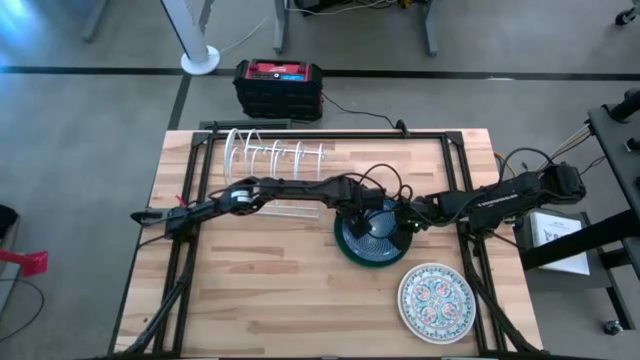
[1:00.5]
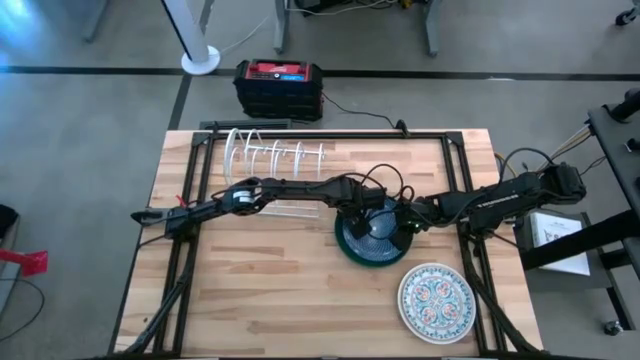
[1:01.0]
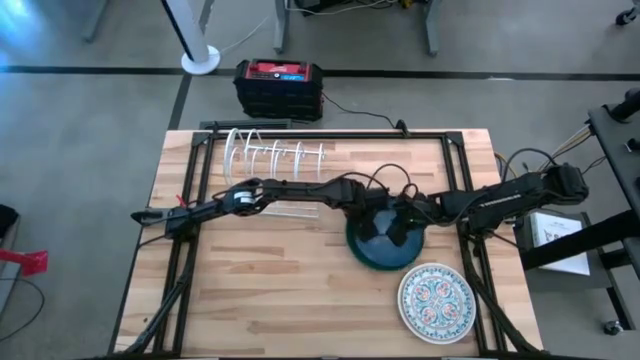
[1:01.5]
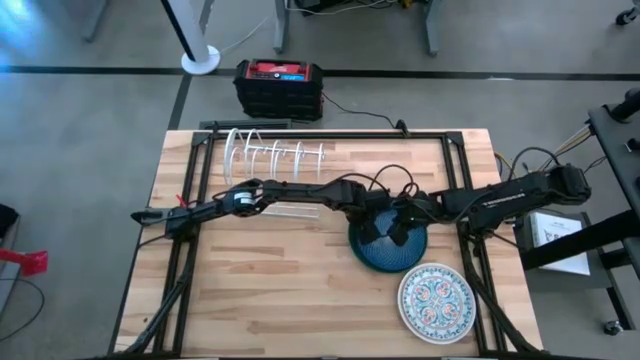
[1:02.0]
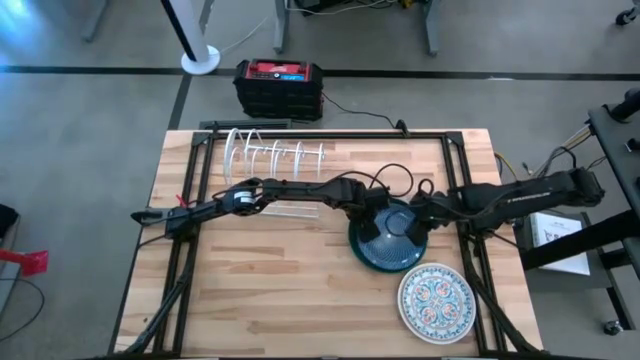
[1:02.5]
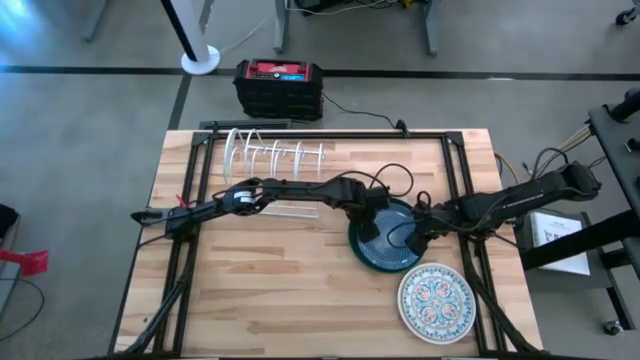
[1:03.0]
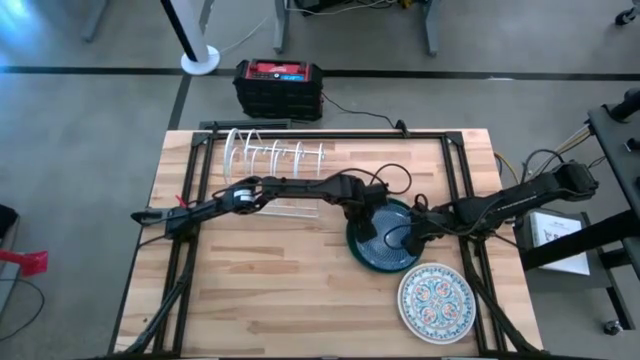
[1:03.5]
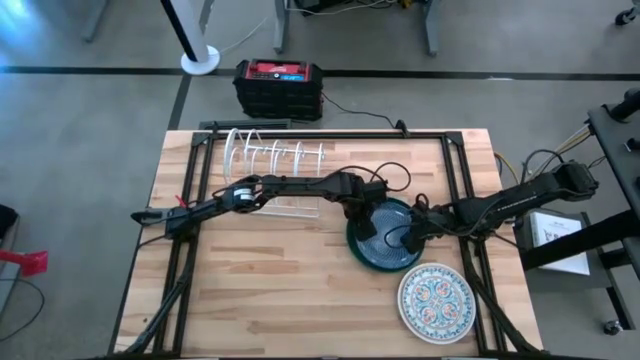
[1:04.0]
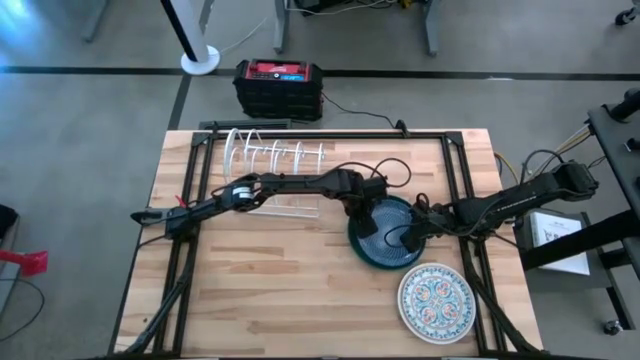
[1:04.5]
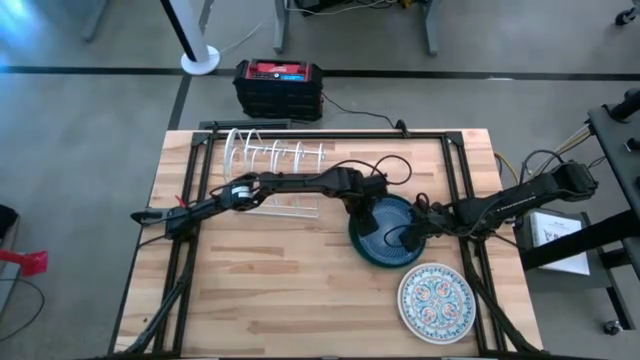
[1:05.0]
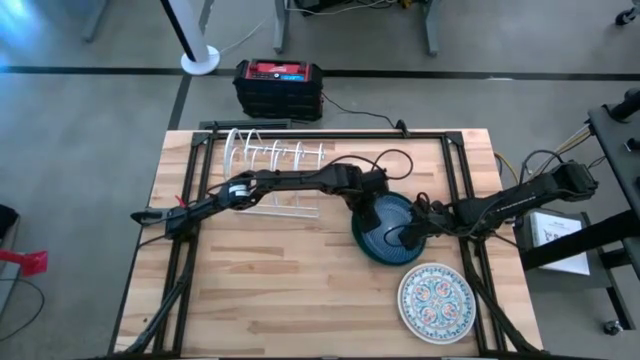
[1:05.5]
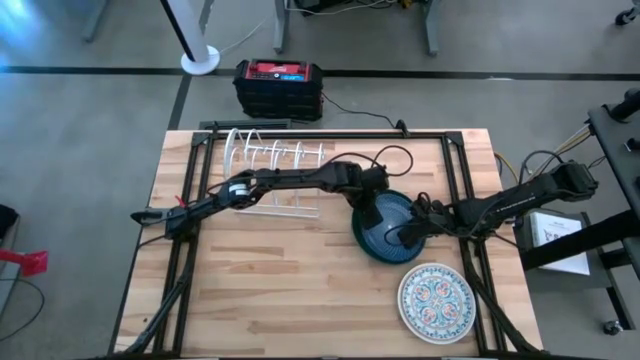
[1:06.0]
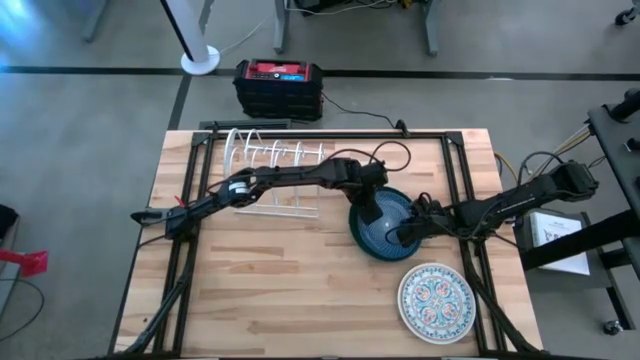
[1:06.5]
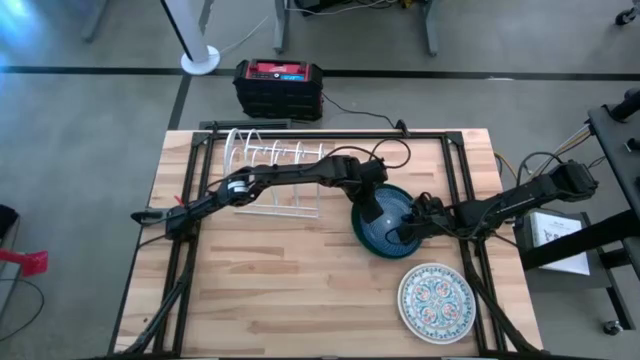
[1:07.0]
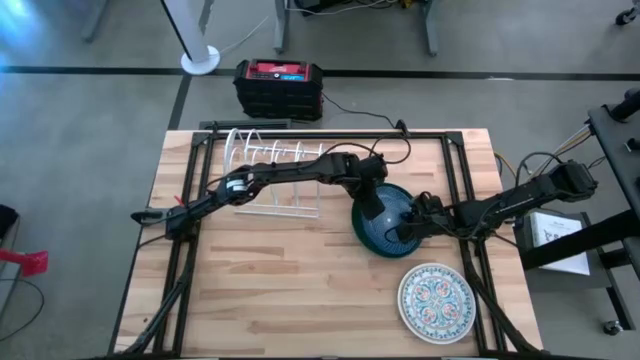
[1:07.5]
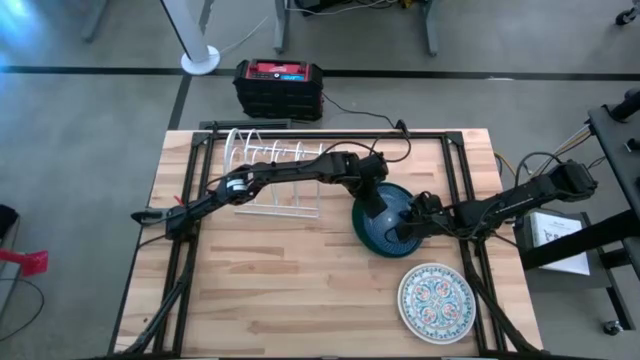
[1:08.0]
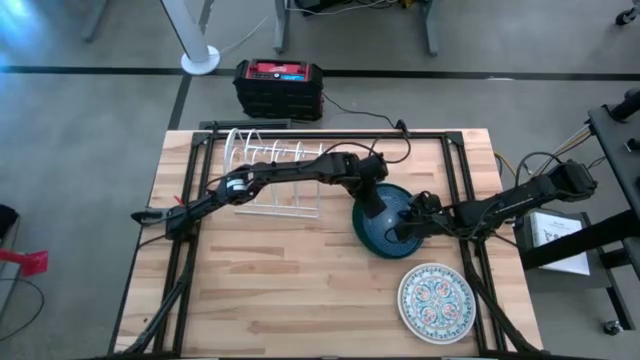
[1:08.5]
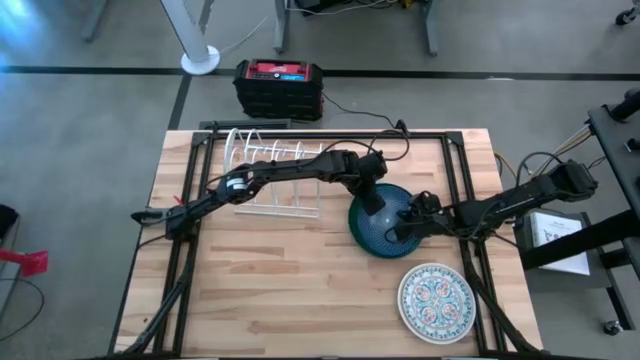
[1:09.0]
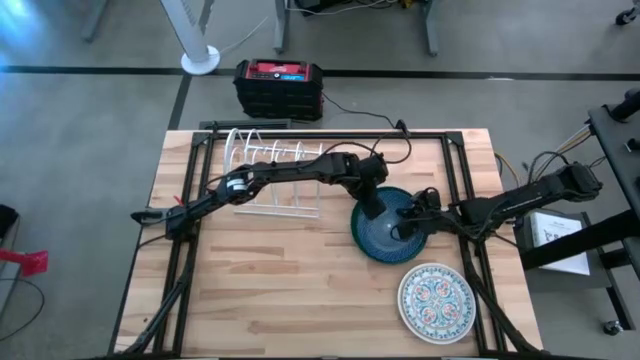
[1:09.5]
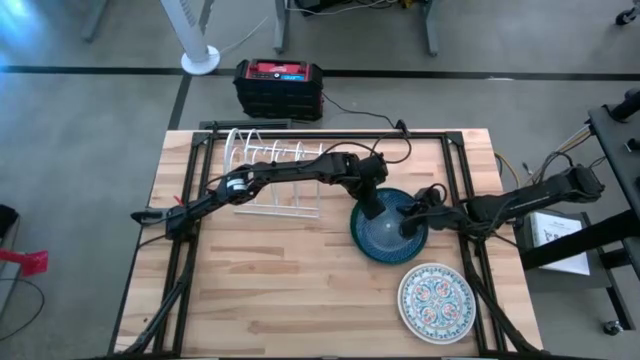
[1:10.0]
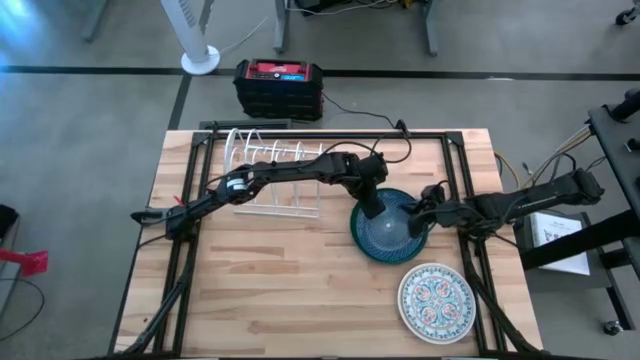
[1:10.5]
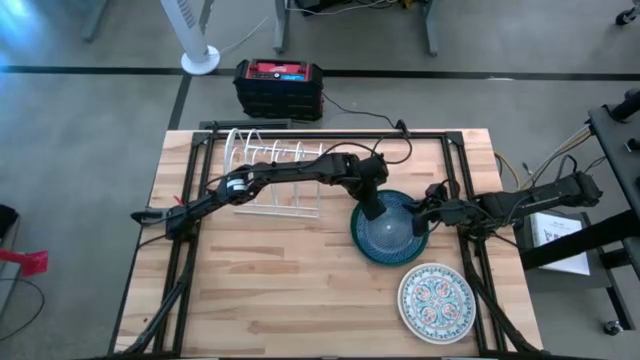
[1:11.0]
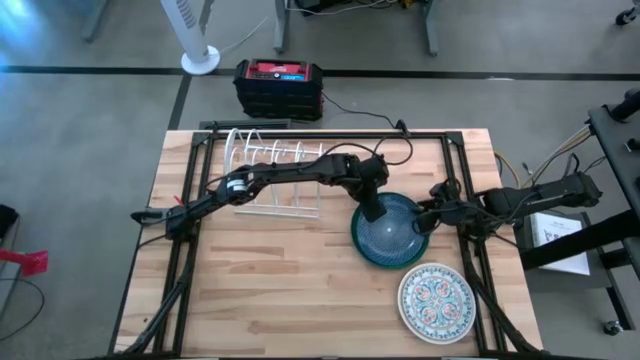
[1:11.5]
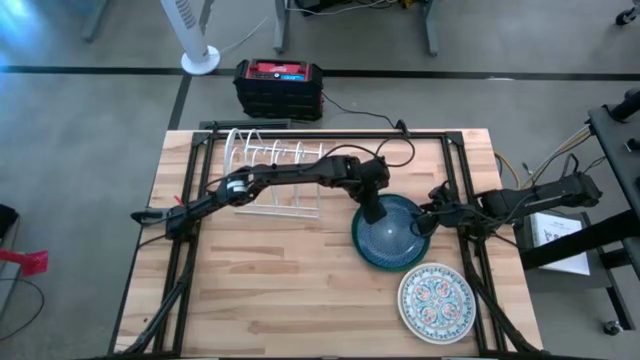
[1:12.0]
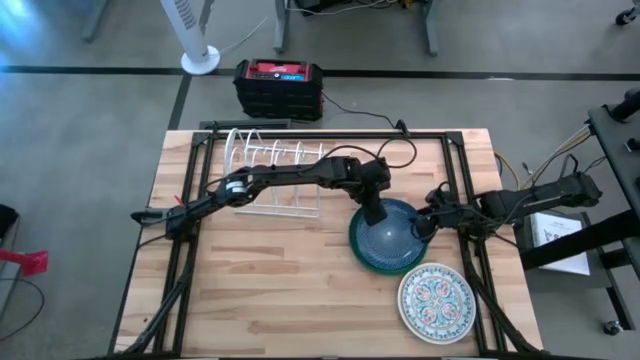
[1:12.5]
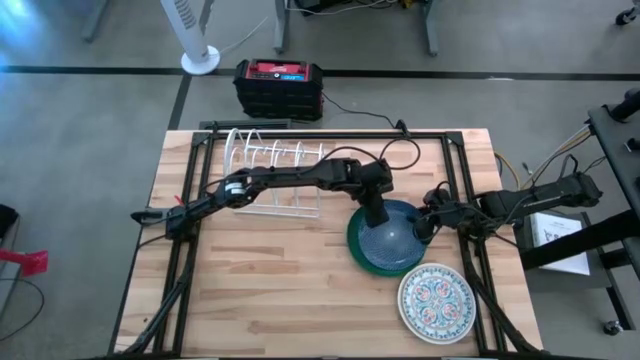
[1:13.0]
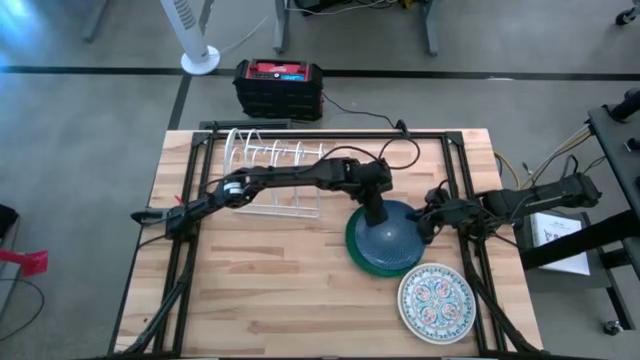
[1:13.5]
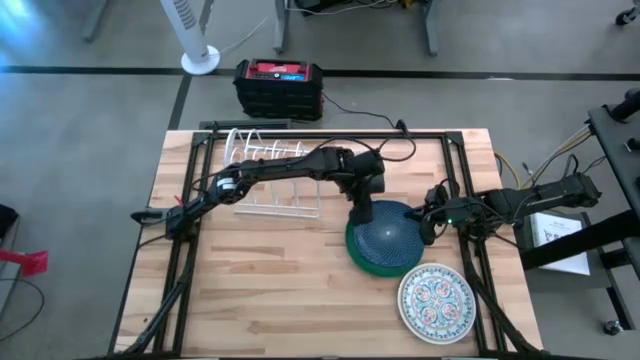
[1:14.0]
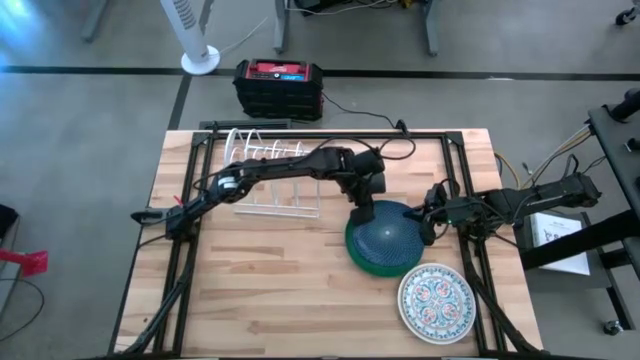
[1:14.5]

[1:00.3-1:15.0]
Task: Sort dishes
Put the blue patterned plate in the dish rack

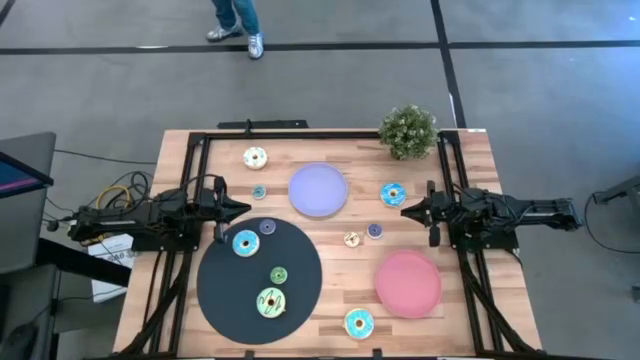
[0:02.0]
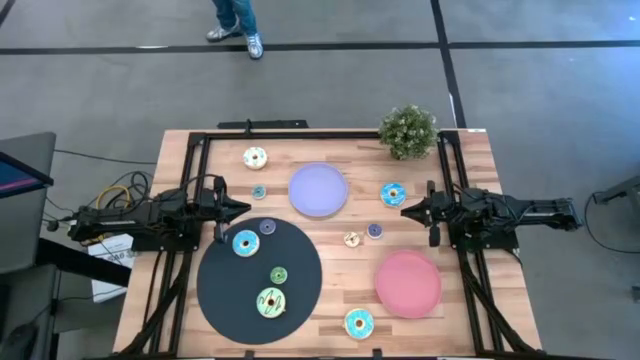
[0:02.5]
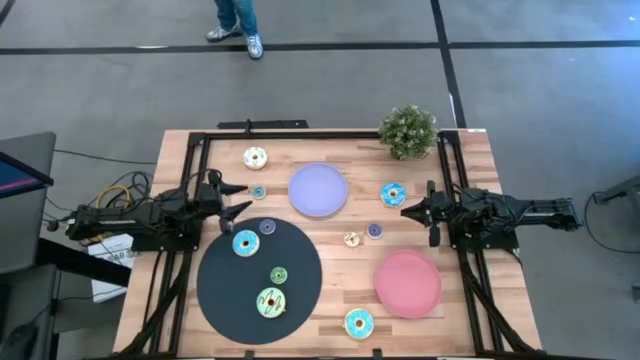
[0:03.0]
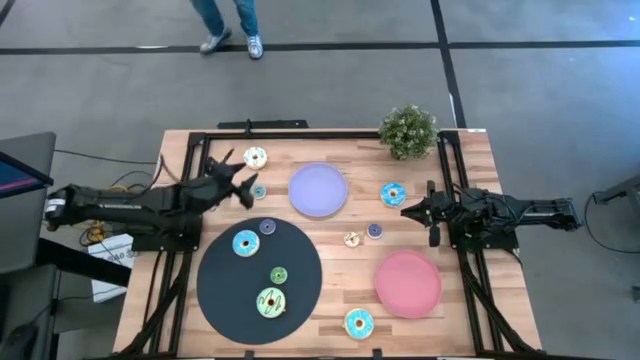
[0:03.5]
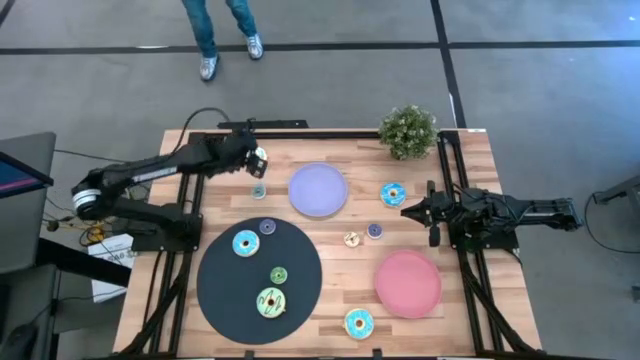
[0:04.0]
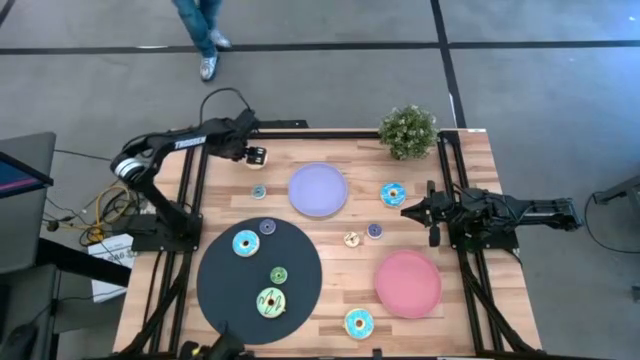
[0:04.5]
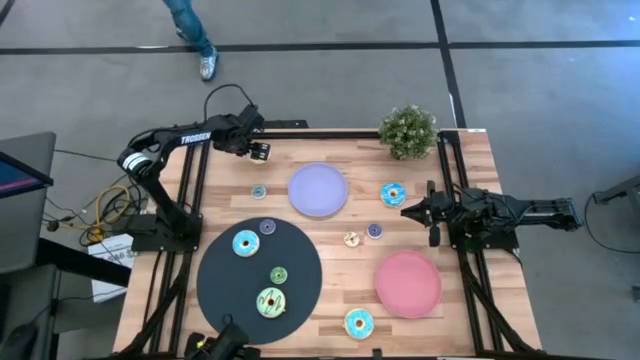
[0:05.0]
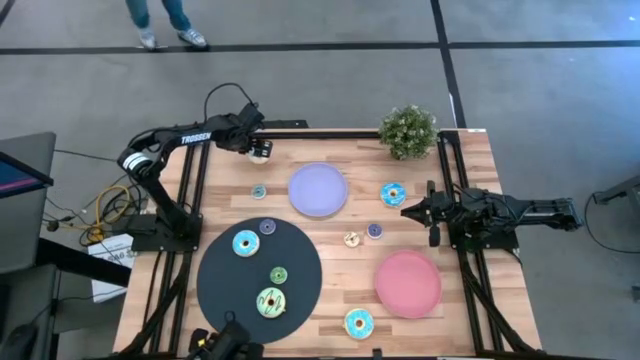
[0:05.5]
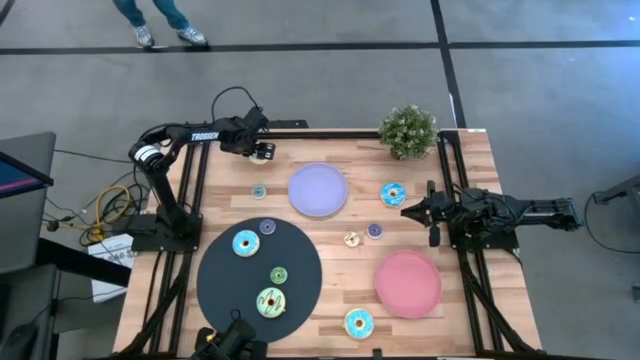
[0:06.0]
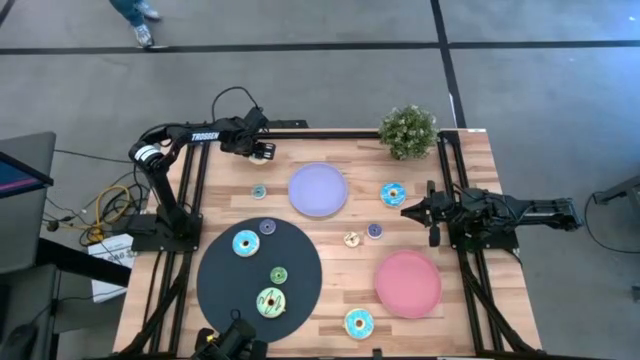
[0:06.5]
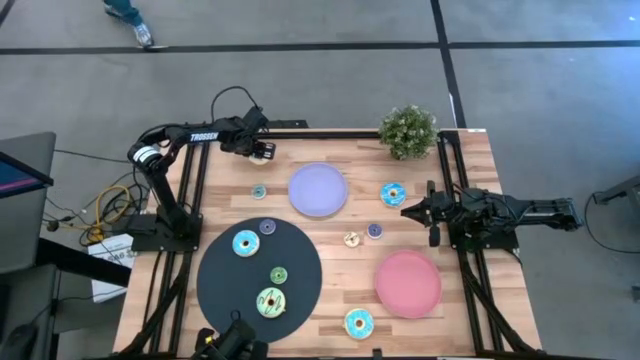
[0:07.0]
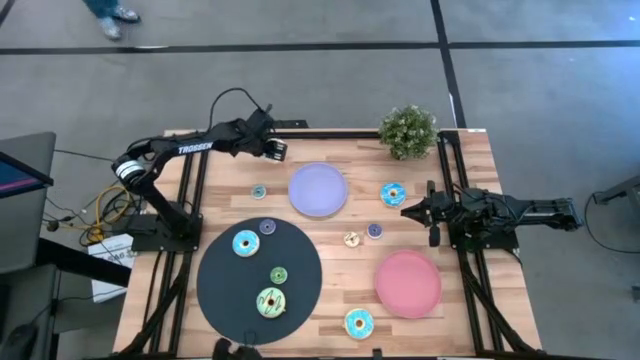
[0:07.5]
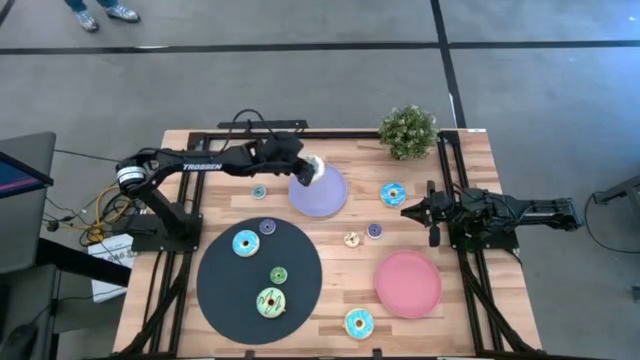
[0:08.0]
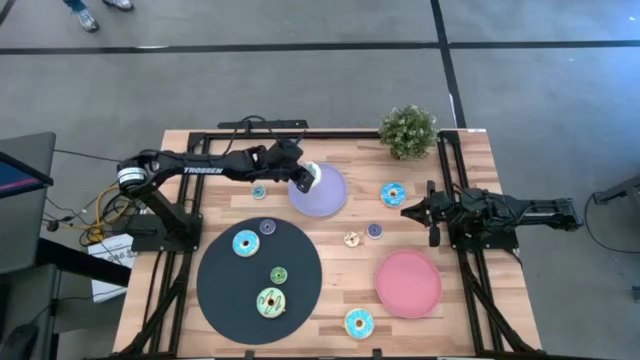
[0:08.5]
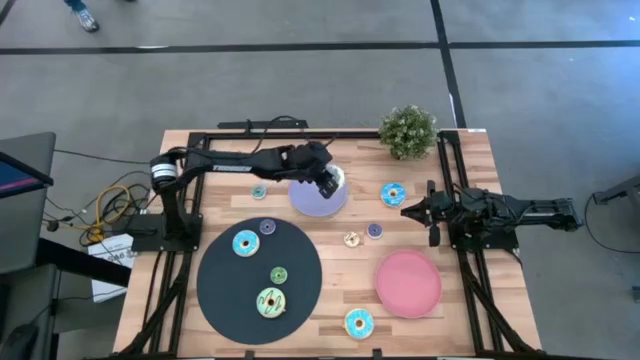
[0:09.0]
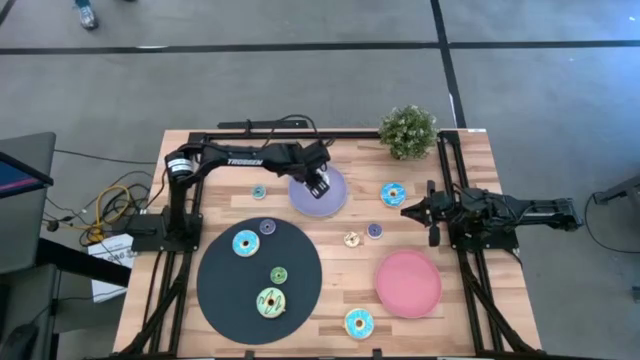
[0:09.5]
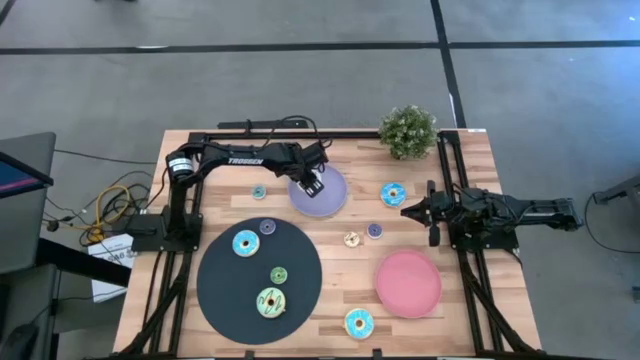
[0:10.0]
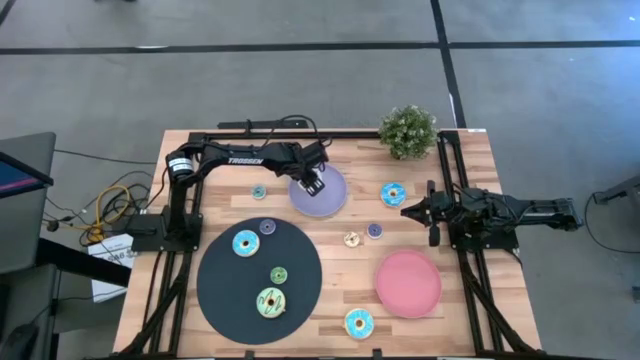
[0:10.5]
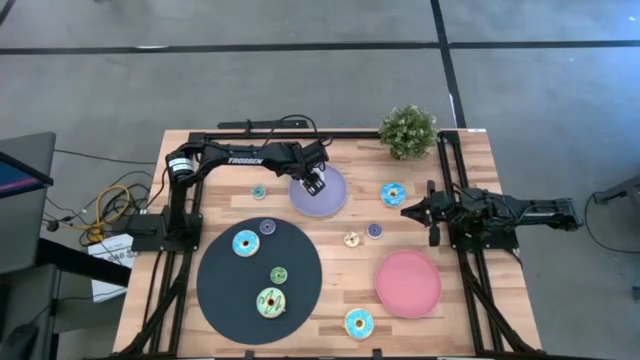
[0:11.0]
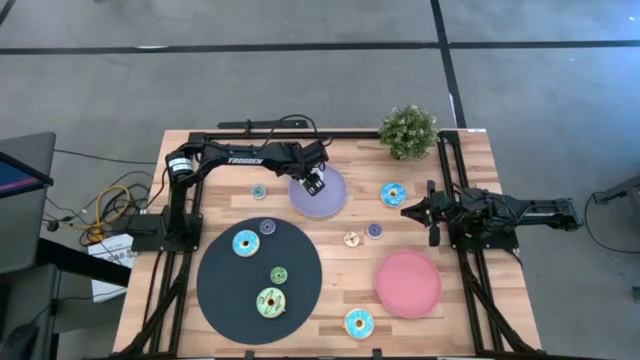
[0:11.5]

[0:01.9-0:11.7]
Task: Pick & Place donuts
Put the large white donut on the purple plate
